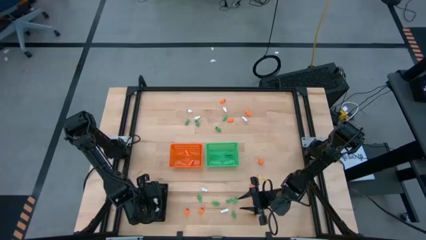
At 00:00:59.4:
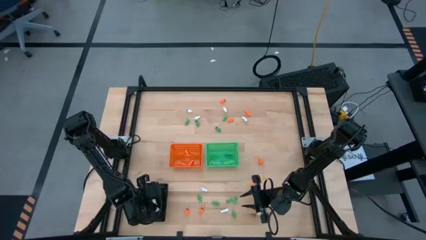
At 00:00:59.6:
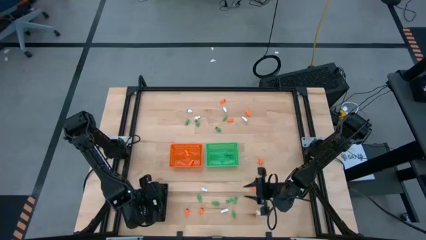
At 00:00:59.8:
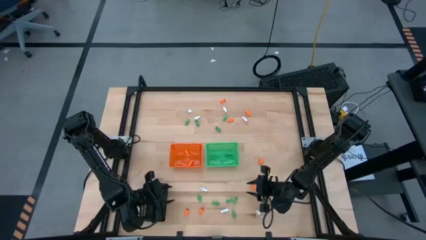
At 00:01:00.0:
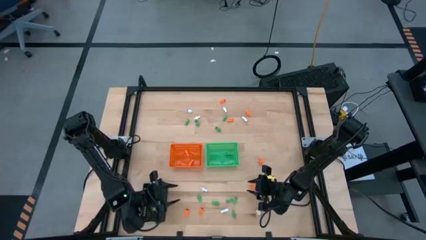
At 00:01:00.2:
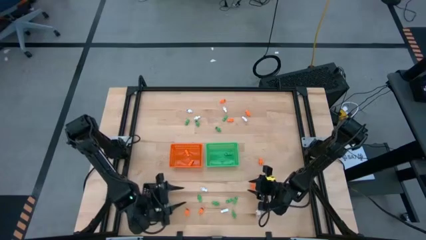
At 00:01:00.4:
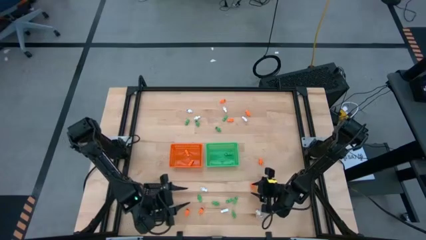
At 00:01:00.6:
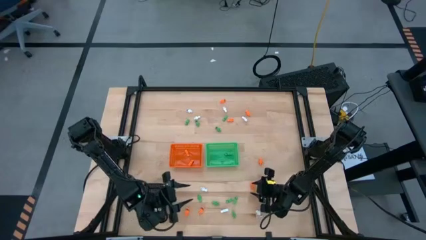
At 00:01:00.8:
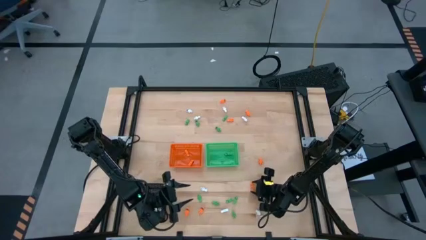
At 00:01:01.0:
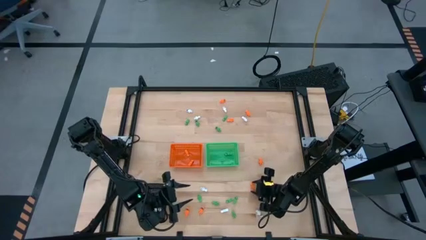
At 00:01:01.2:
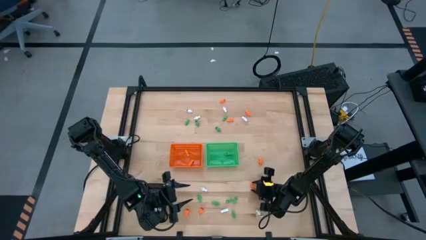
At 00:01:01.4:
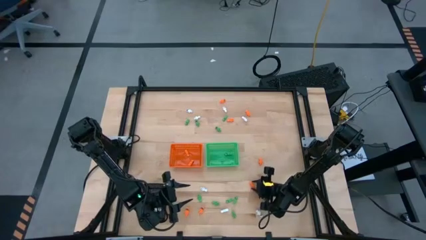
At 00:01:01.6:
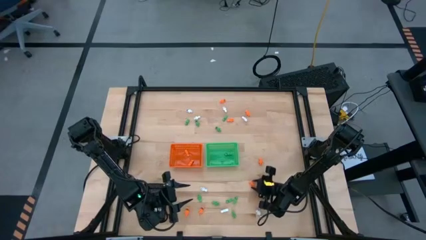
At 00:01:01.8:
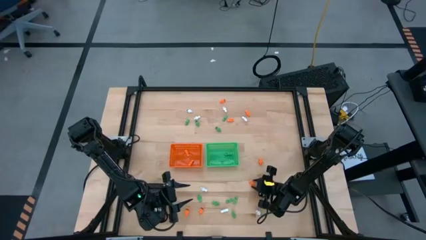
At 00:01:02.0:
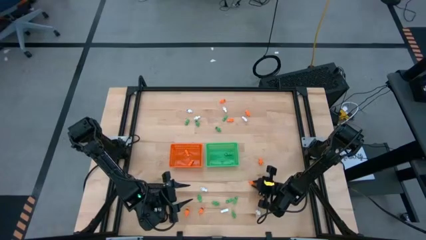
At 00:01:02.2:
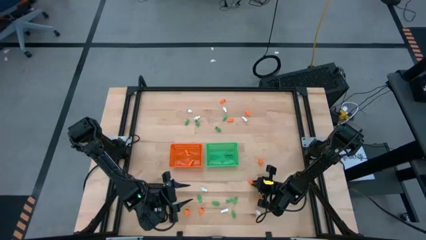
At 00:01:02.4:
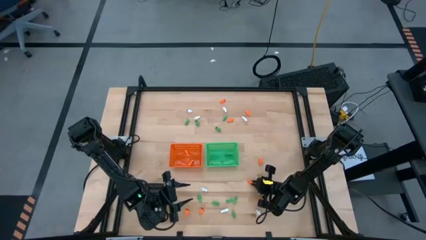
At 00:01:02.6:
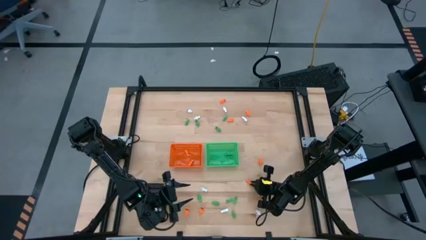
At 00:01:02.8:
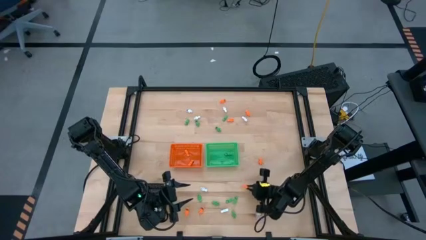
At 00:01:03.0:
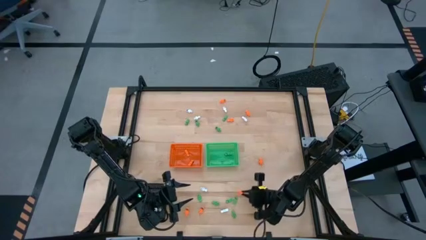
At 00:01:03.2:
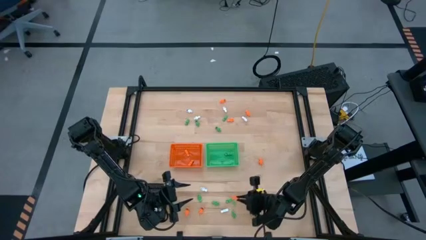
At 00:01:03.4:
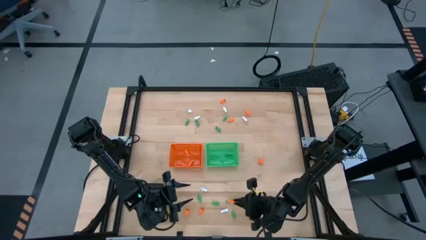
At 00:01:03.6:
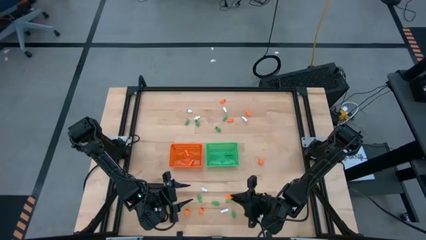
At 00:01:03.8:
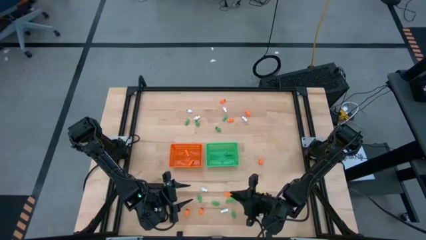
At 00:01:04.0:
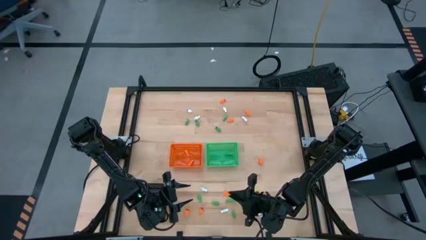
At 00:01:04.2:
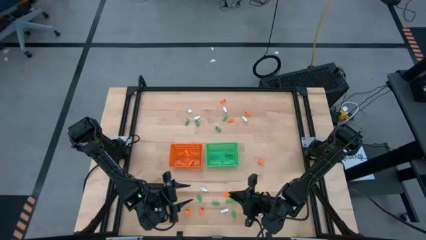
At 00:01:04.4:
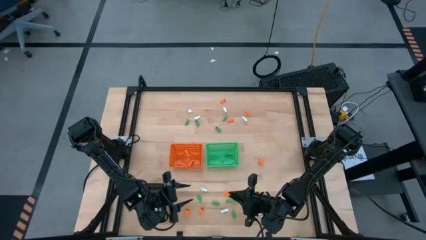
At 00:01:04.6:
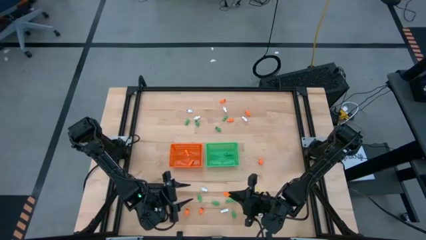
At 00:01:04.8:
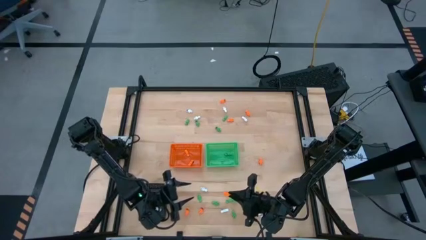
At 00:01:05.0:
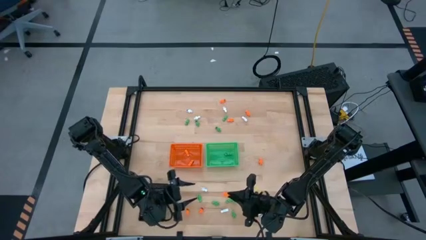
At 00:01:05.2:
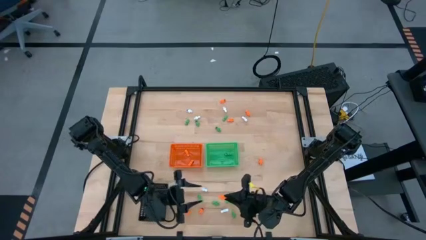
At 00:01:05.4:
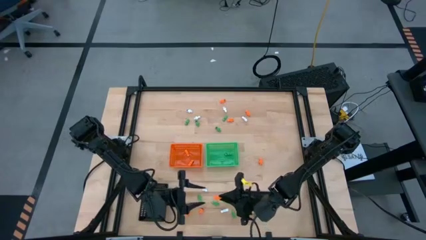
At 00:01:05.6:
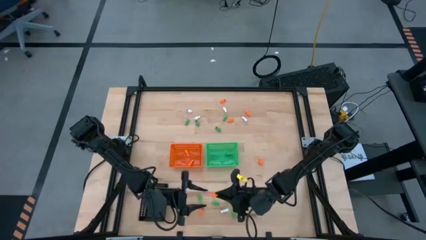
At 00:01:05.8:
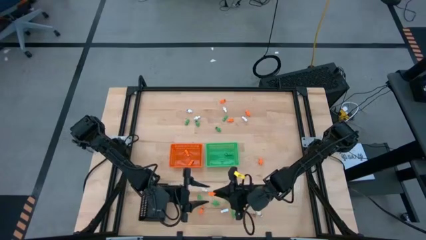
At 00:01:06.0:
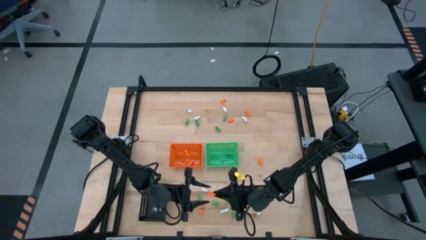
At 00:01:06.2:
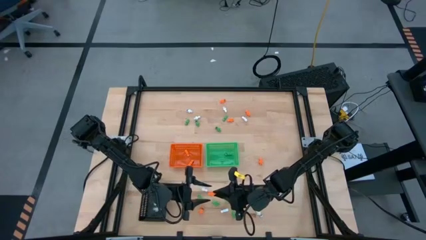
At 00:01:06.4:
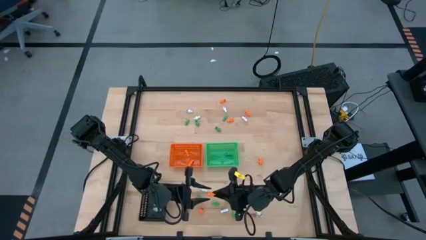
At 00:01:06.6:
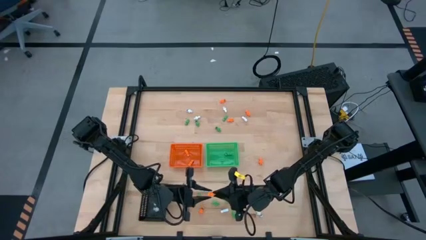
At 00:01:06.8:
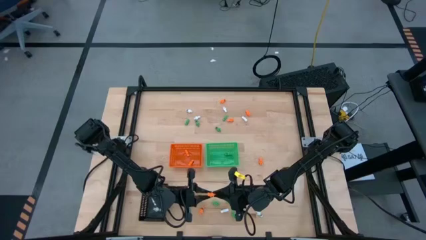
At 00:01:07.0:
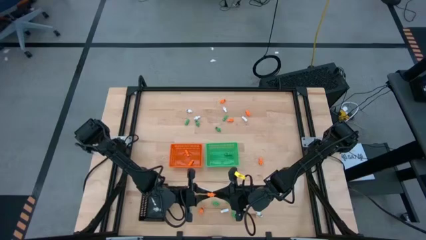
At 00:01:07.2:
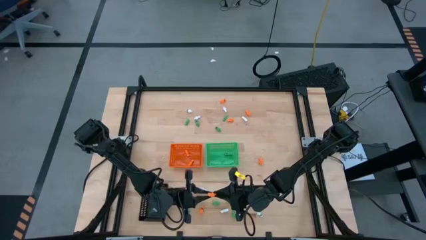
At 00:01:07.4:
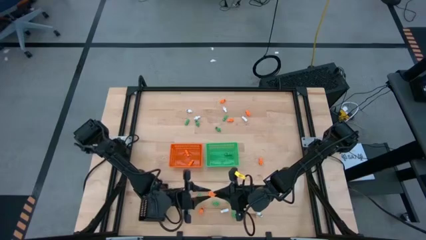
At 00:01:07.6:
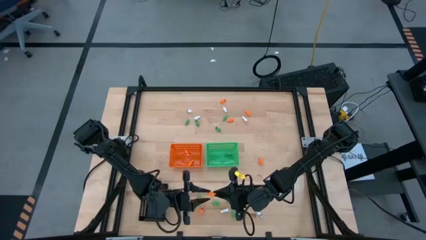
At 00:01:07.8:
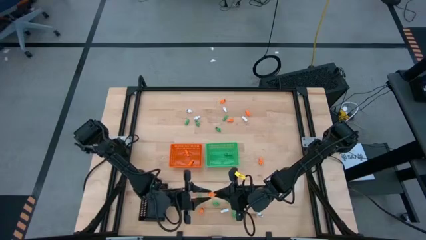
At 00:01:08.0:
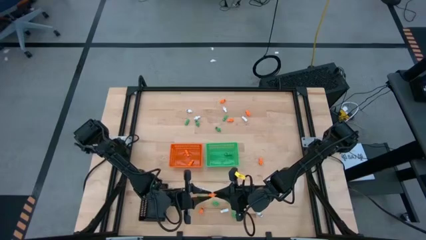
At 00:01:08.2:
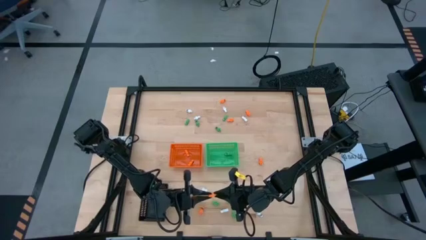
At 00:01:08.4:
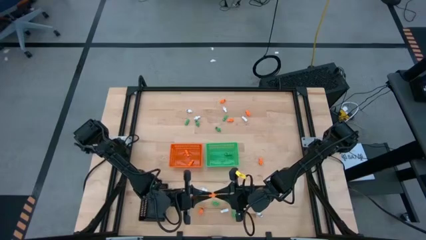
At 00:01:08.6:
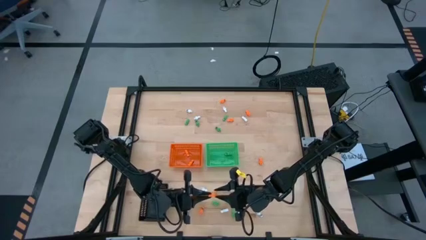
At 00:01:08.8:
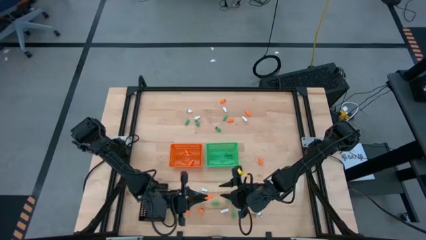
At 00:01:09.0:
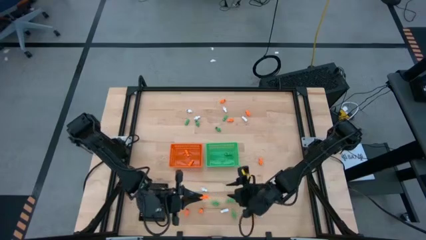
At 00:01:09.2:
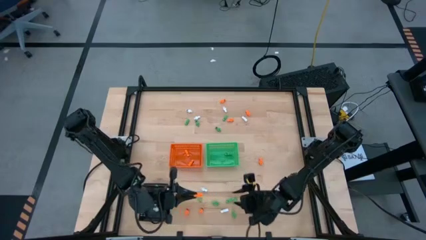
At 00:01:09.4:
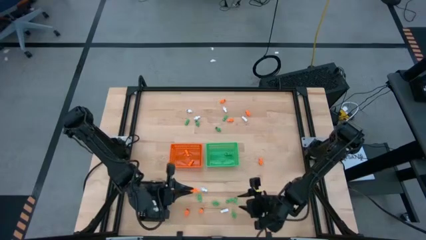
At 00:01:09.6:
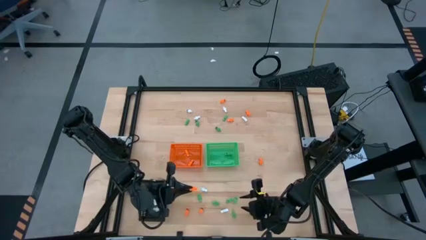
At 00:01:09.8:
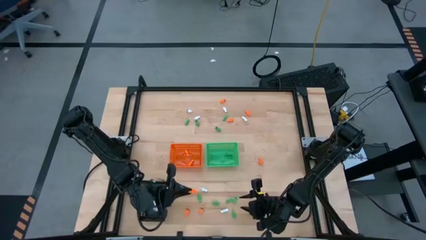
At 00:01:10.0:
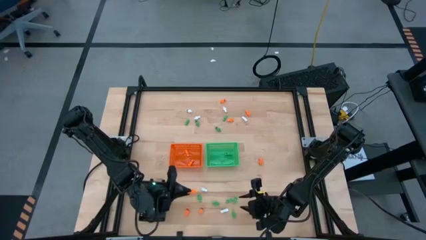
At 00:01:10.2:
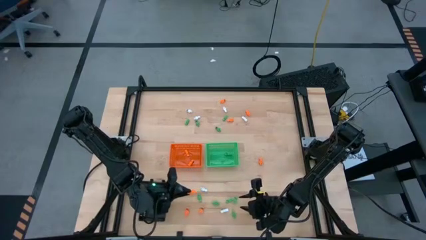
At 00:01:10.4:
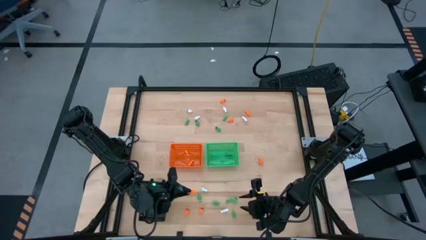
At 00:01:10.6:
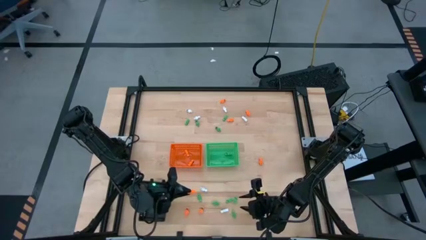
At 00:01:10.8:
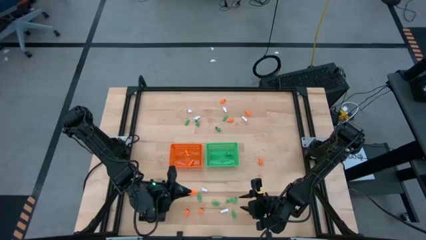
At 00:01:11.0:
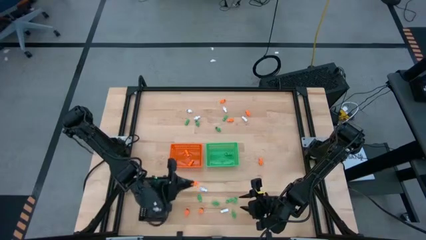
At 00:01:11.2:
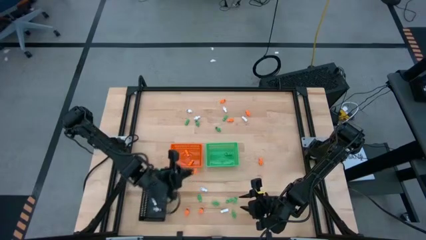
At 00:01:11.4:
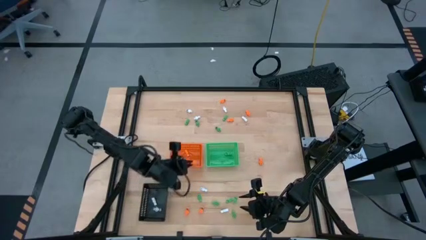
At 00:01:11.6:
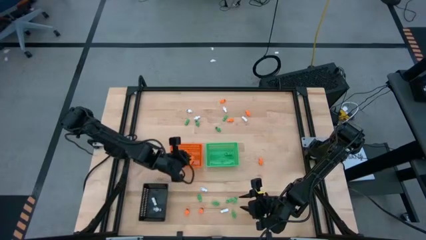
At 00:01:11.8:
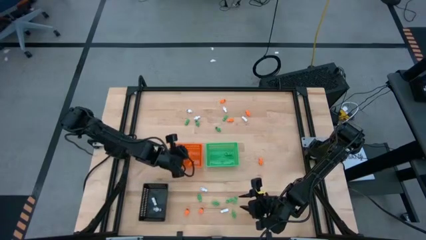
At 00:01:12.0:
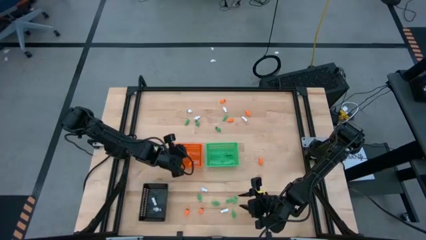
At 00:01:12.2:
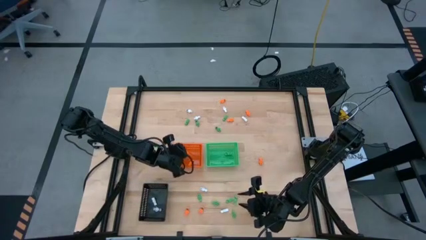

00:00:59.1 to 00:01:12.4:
Task: Sort Halloween decoration
Put the orange skeleton toy into the orange bin
